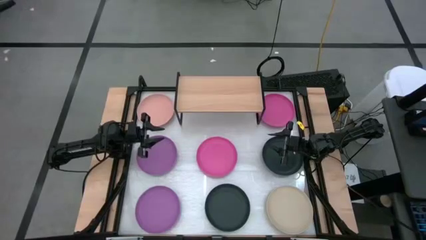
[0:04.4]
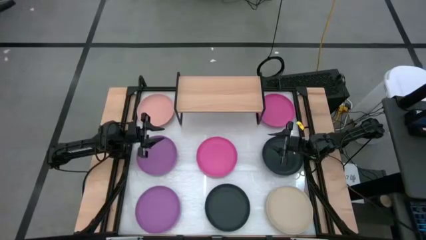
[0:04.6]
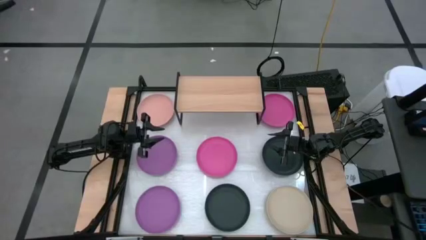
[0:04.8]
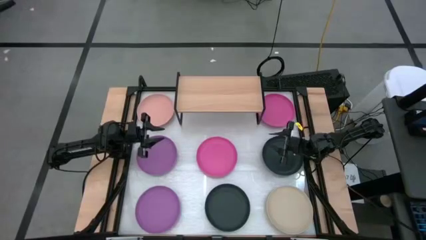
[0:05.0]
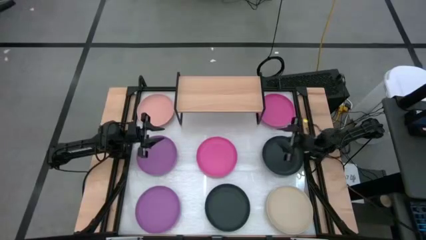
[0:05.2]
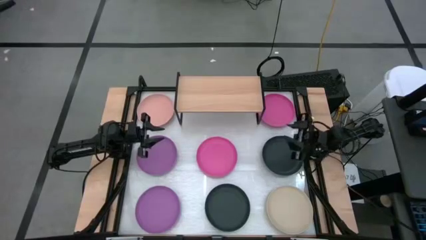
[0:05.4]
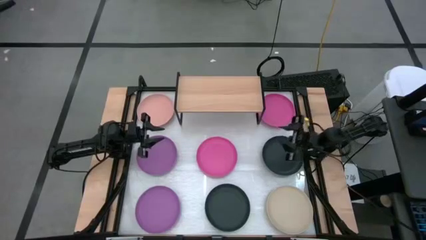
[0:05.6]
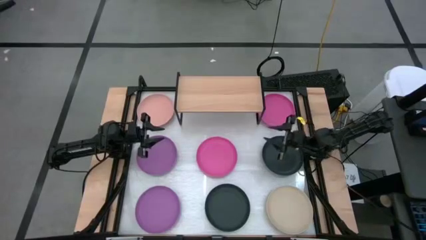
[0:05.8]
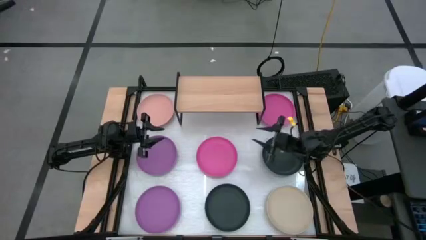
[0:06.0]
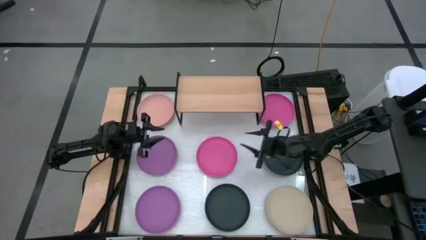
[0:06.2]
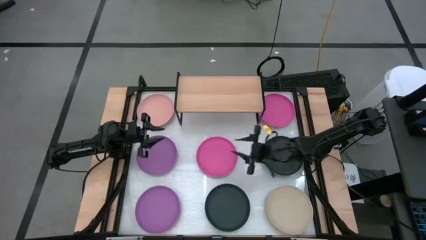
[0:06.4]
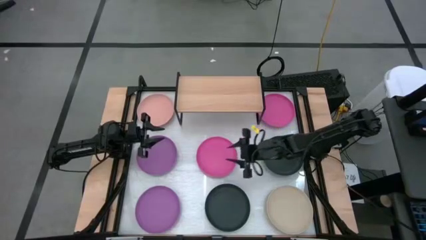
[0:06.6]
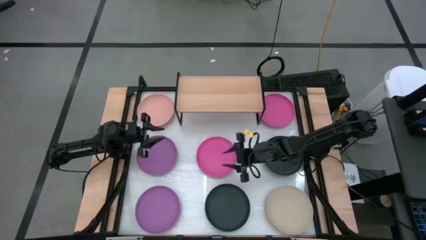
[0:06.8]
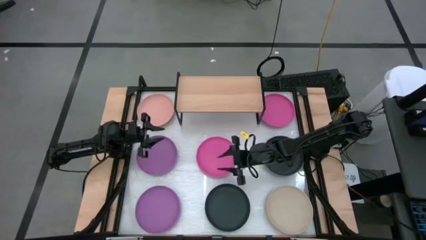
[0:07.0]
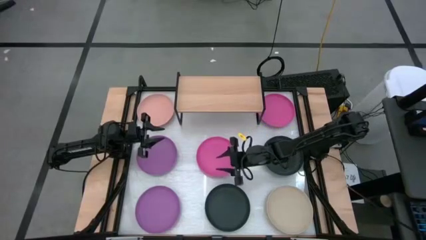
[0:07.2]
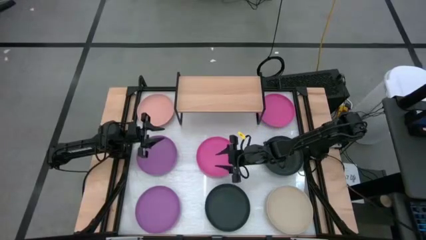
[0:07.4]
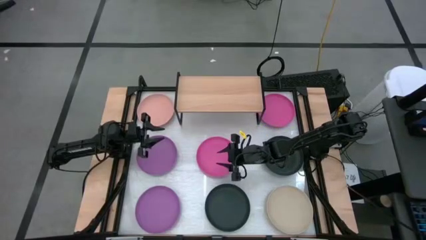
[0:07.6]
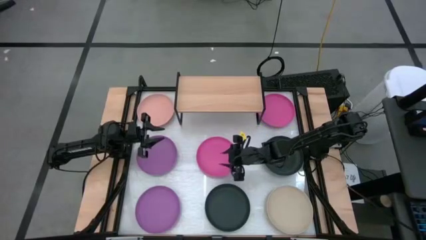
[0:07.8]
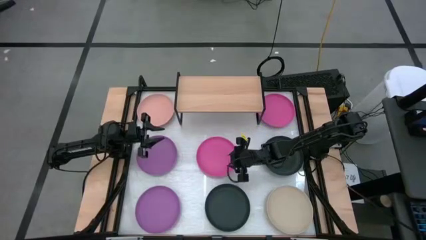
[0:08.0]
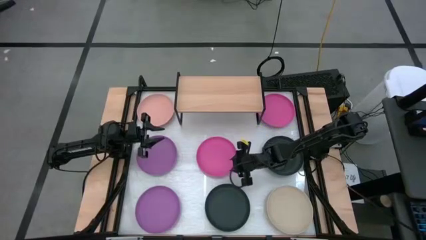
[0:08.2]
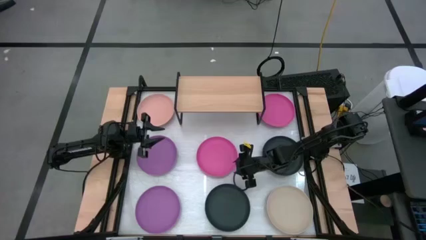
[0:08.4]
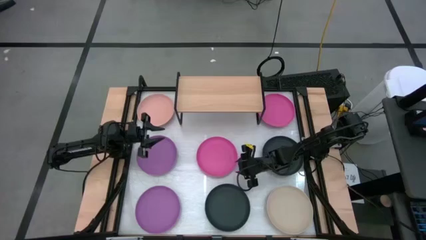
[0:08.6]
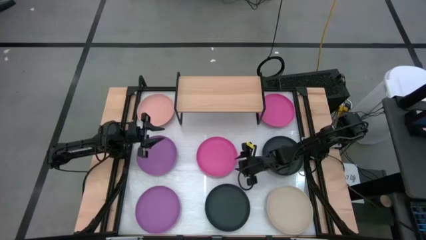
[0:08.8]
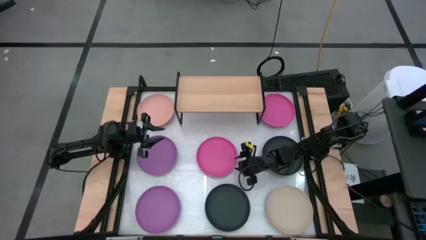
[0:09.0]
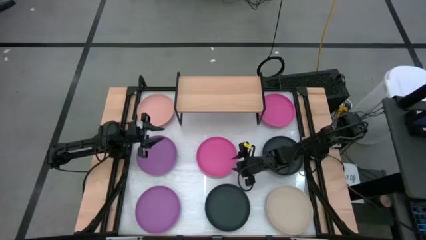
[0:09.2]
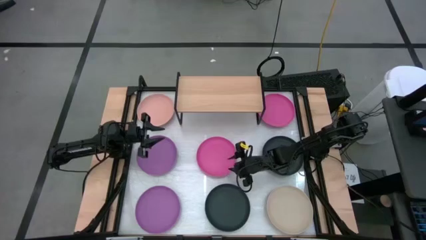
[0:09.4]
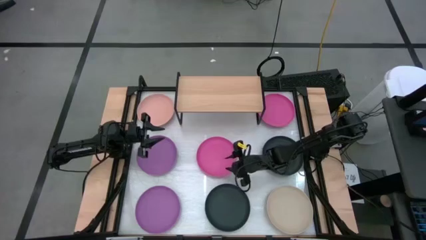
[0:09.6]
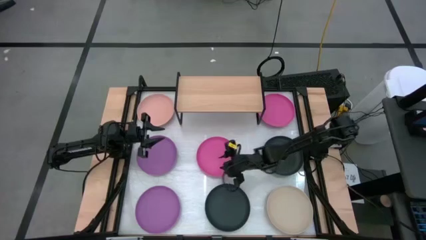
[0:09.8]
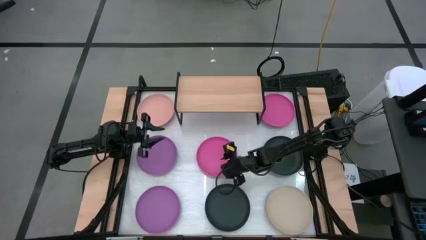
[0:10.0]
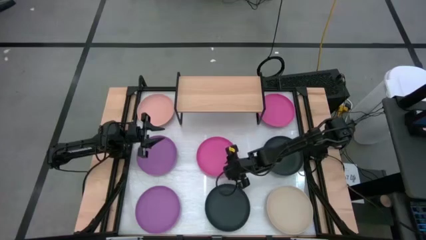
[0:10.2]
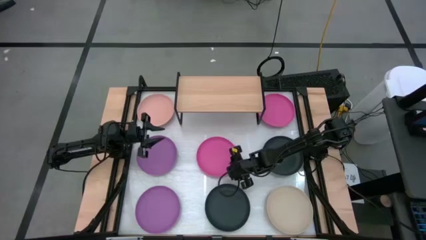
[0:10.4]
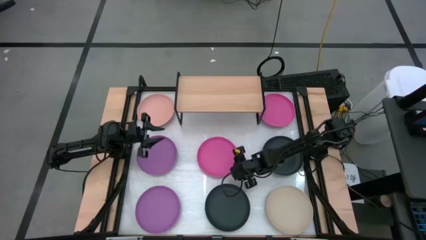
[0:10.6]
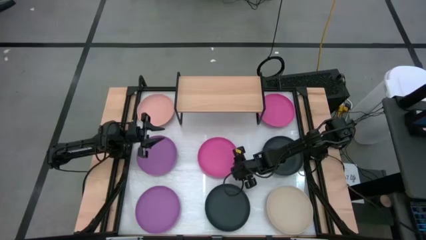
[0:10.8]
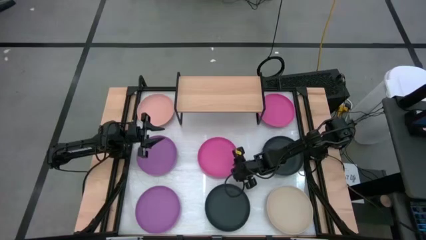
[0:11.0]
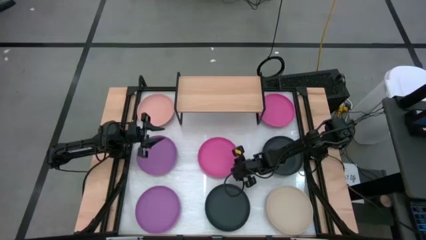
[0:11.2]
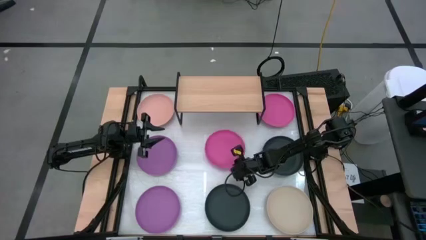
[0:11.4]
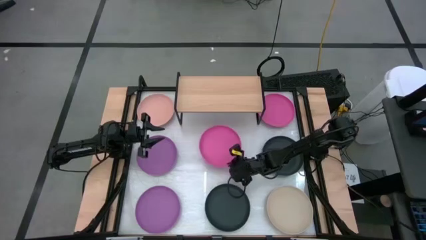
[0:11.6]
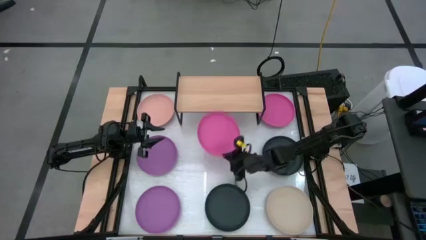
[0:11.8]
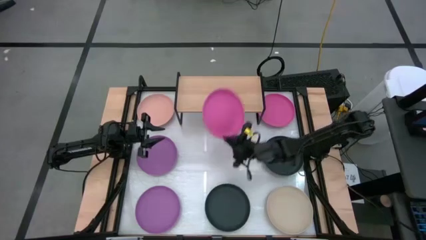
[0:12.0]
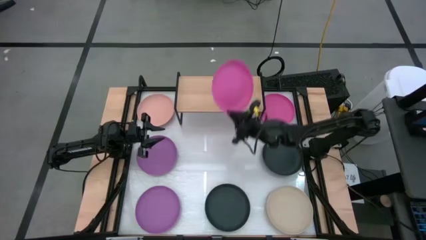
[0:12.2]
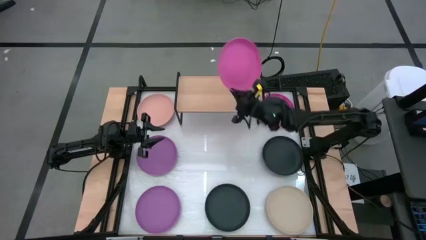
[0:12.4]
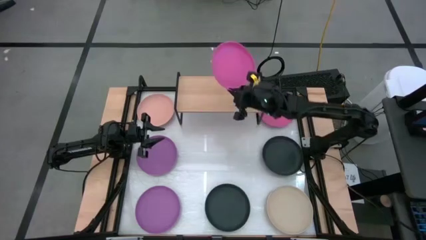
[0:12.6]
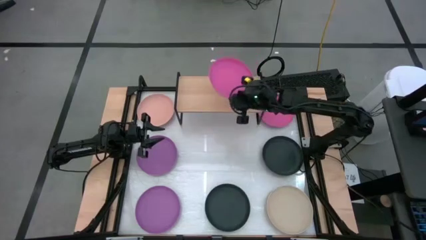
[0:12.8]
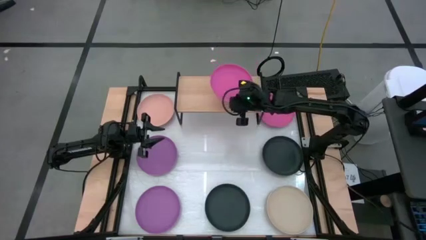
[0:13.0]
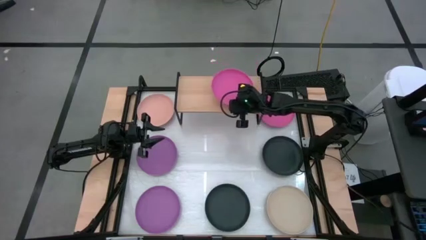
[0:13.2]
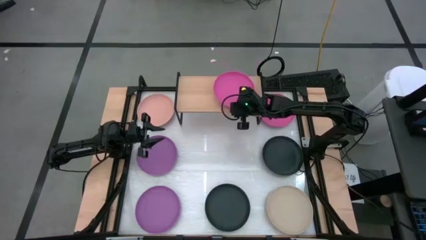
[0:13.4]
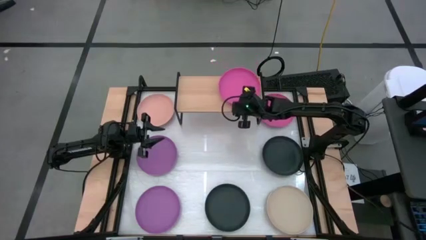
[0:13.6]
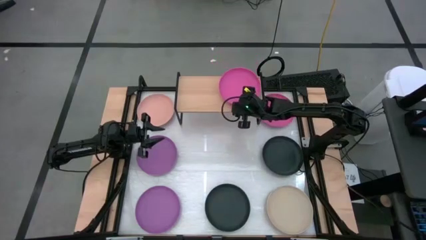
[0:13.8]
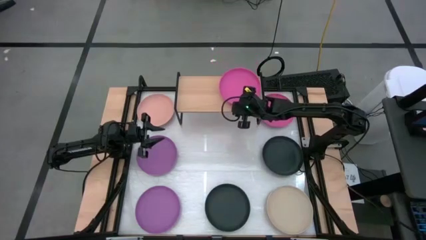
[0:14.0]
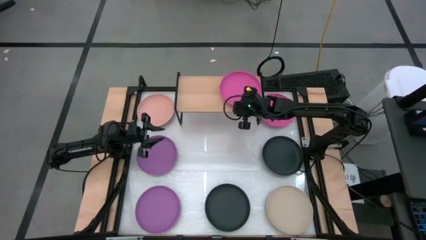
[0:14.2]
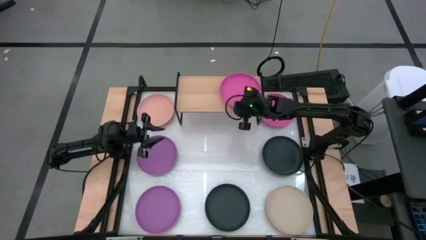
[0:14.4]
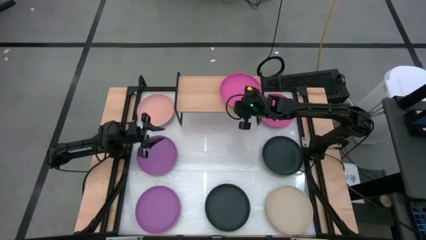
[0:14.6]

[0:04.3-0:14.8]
Task: Place and stack plates onto a shelf
Put the bottom pink plate on the shelf

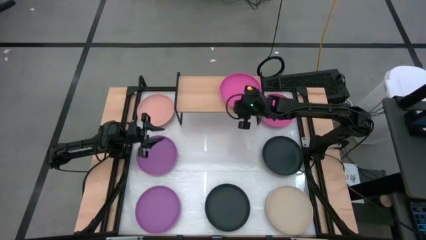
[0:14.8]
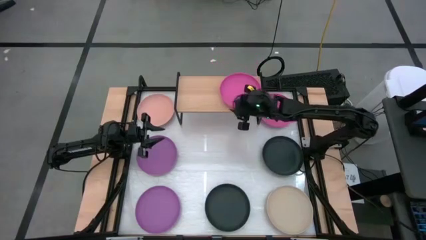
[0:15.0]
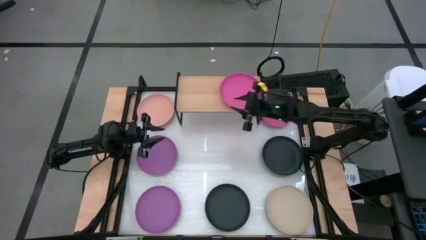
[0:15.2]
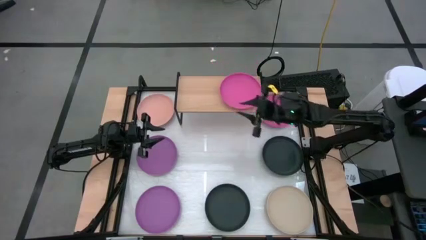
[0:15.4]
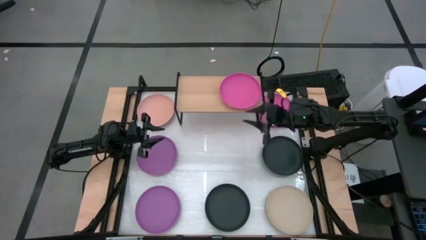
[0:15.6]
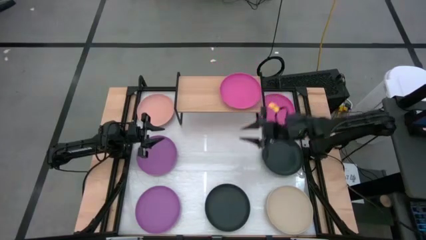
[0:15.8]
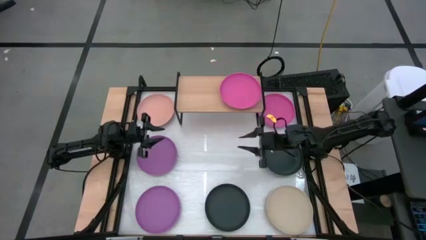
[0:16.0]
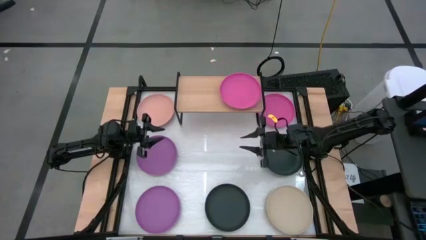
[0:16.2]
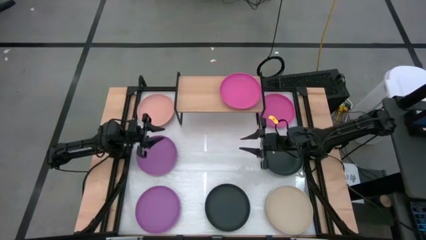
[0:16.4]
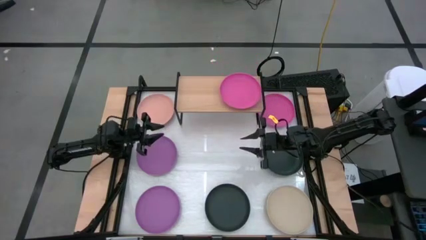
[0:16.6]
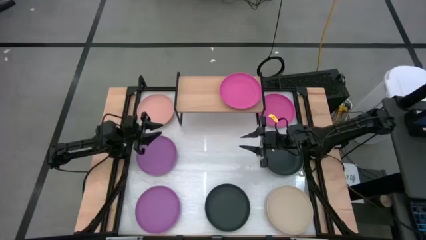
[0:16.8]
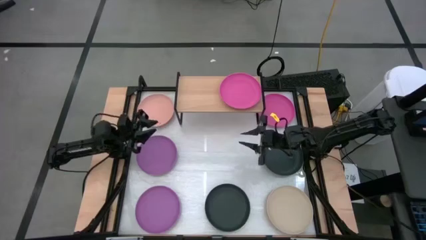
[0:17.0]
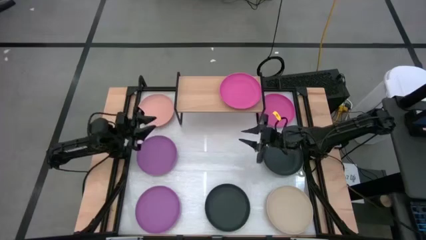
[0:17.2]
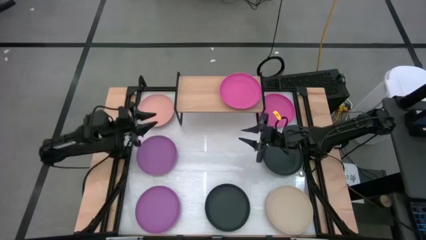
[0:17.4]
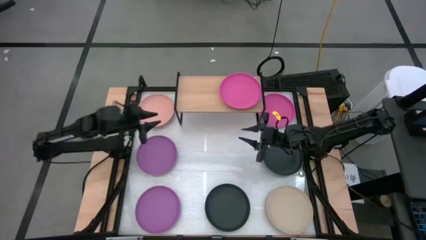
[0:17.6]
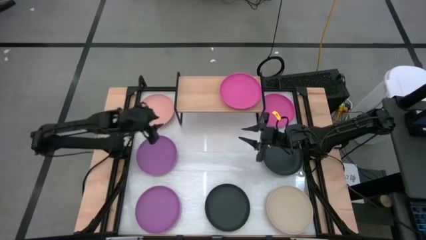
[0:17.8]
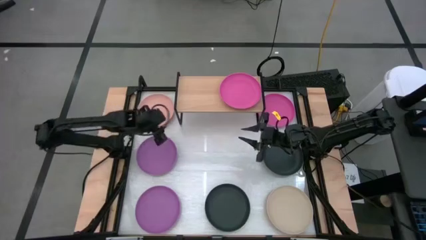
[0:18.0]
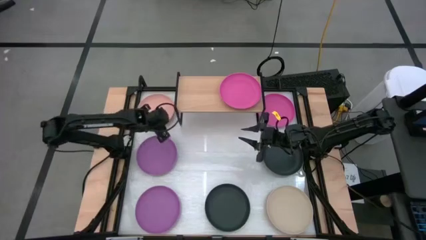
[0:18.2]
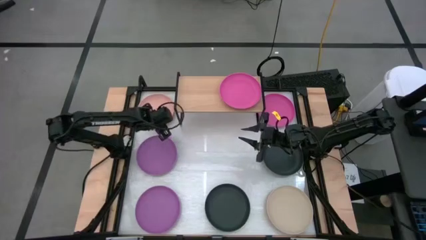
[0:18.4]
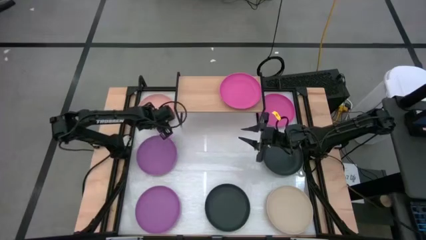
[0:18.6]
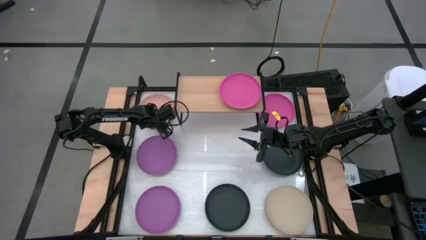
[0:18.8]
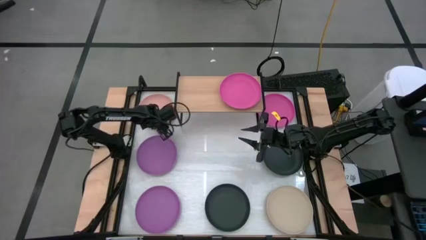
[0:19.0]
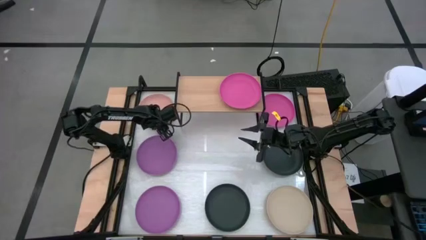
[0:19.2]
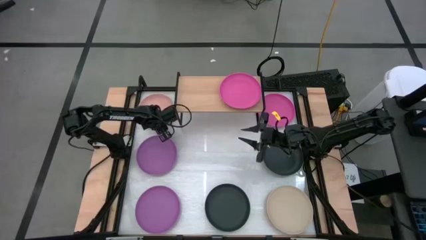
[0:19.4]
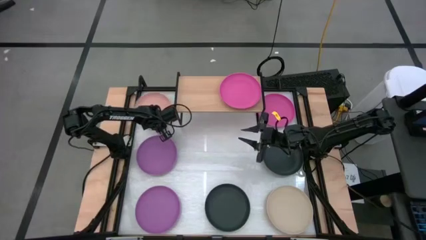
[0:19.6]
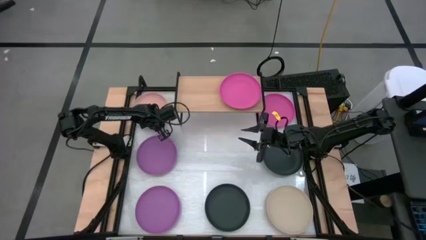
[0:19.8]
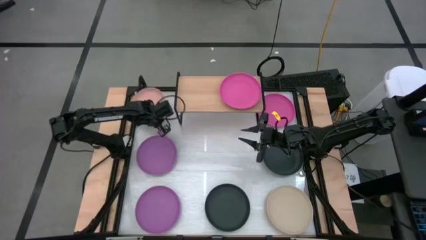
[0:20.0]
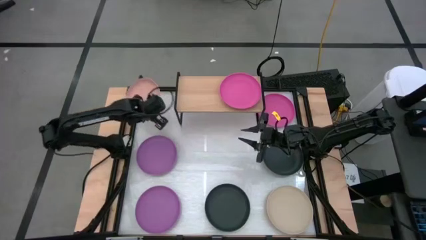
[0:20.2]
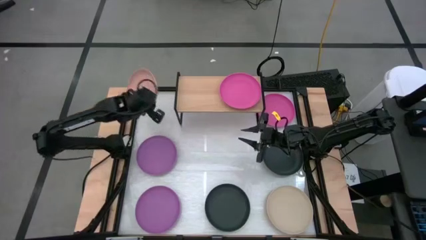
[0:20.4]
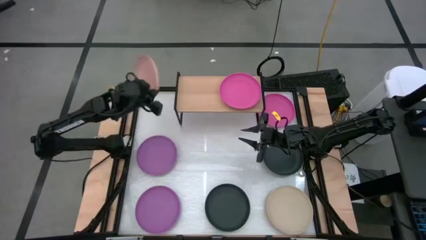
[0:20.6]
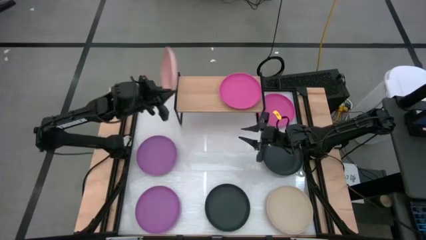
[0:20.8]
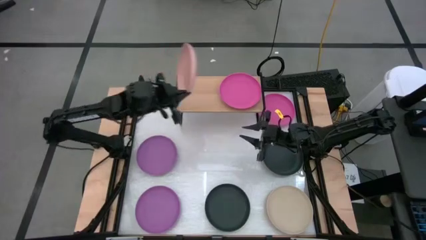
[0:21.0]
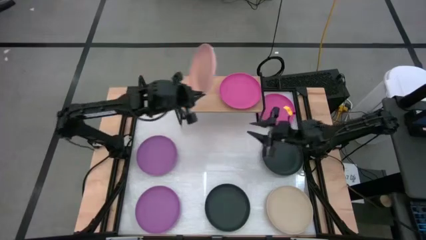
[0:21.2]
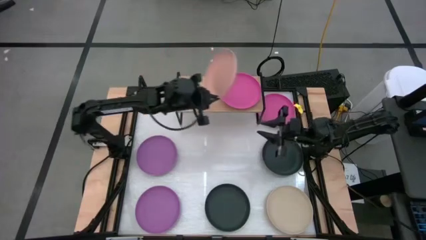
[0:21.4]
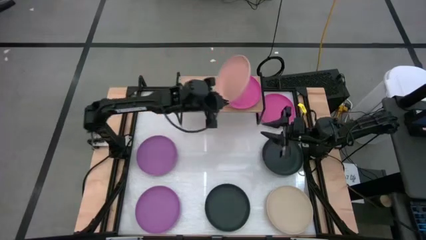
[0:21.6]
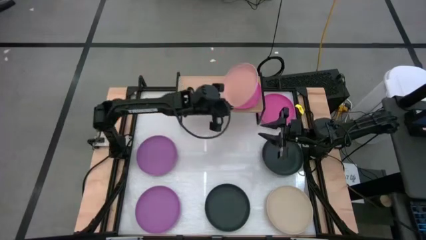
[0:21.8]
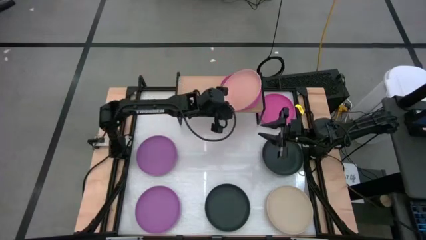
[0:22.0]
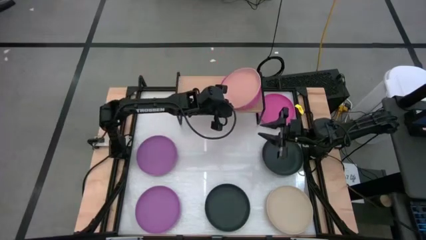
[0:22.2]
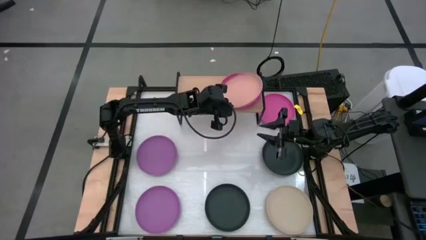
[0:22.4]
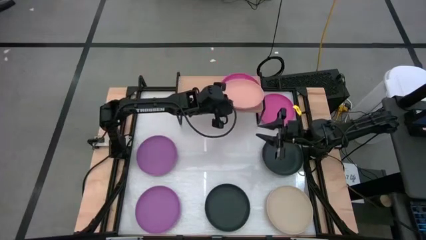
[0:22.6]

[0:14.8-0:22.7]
Stack the light orange plate on top of the pink plate on the shelf
